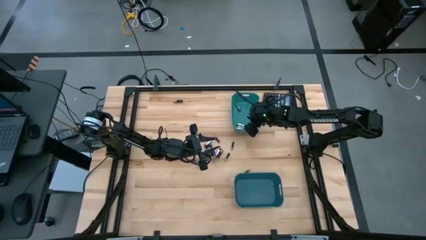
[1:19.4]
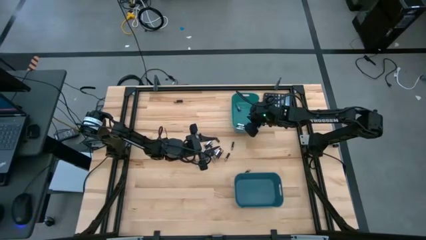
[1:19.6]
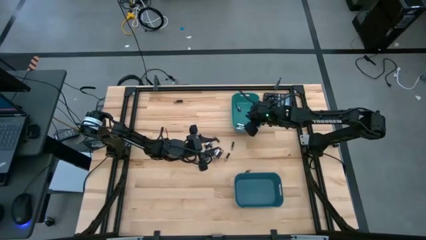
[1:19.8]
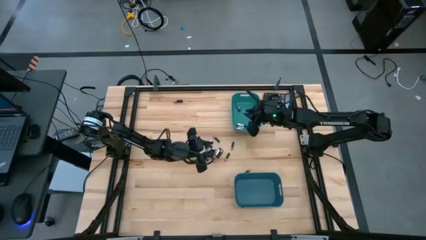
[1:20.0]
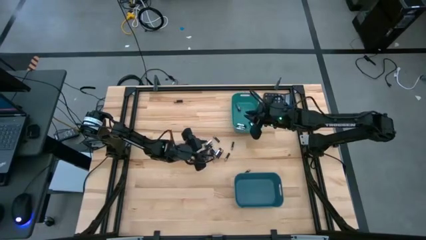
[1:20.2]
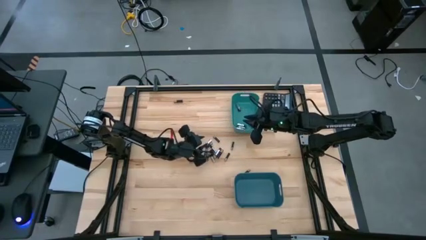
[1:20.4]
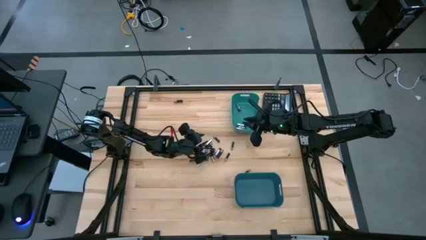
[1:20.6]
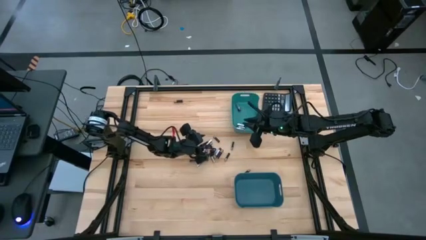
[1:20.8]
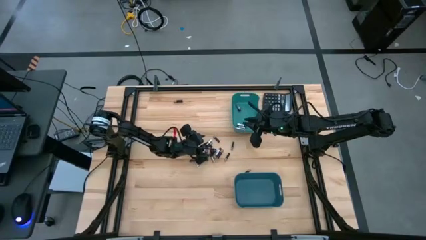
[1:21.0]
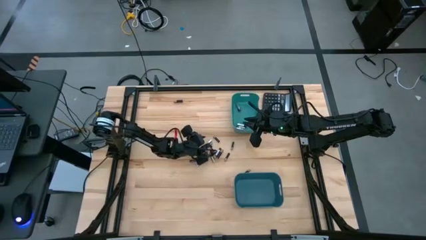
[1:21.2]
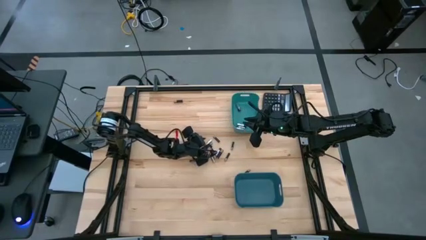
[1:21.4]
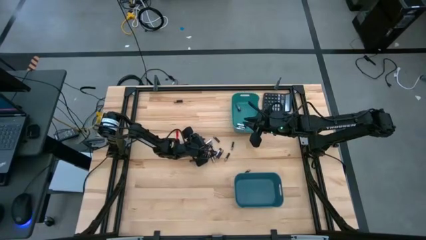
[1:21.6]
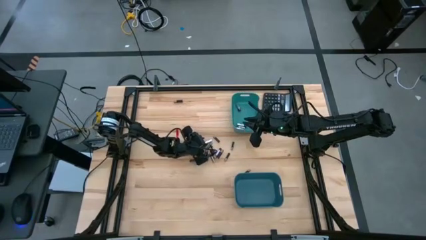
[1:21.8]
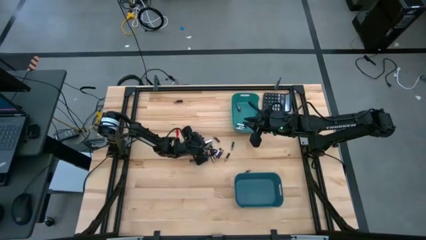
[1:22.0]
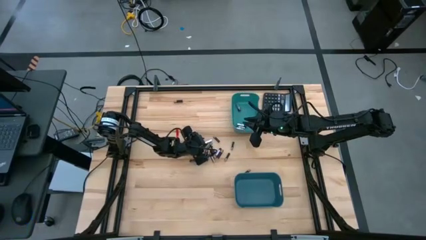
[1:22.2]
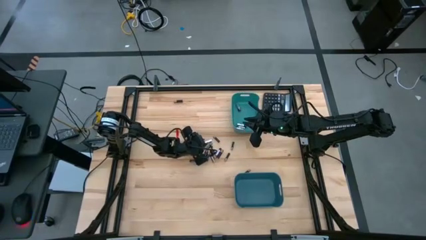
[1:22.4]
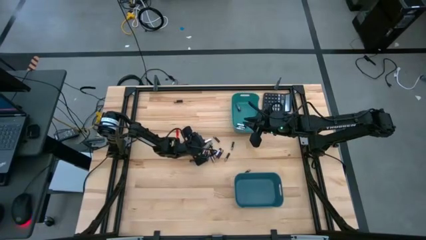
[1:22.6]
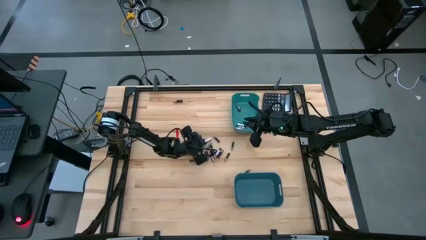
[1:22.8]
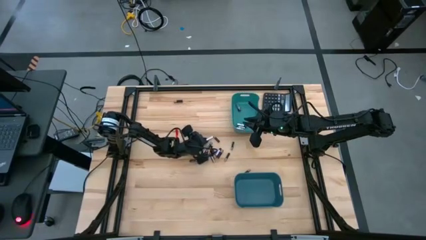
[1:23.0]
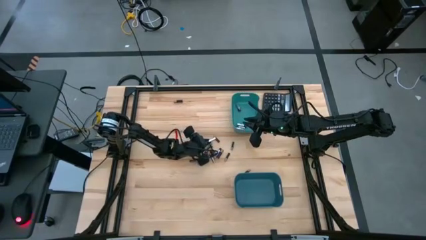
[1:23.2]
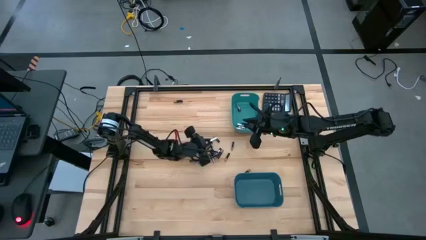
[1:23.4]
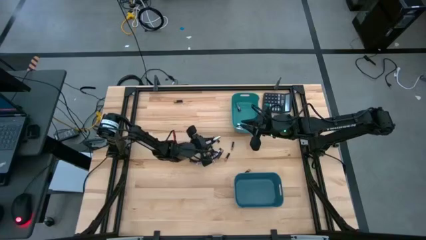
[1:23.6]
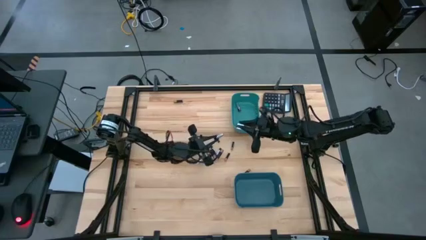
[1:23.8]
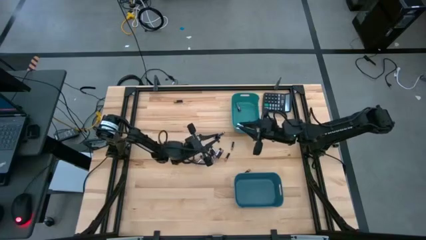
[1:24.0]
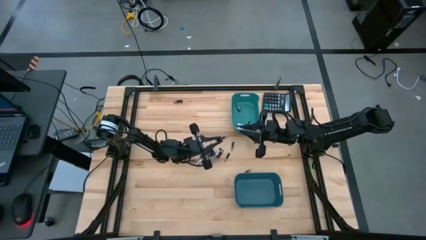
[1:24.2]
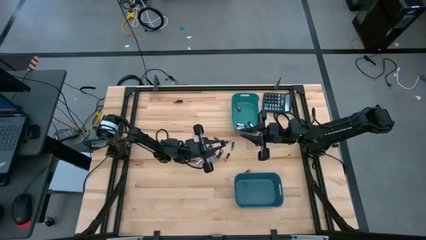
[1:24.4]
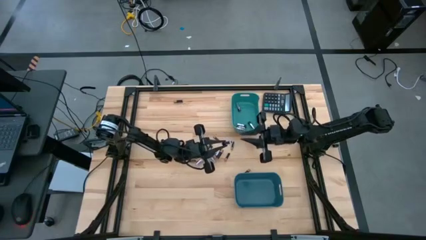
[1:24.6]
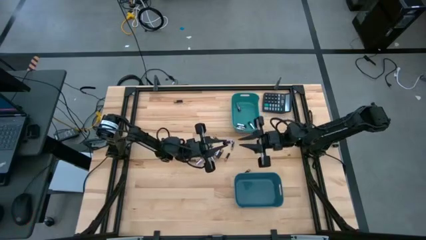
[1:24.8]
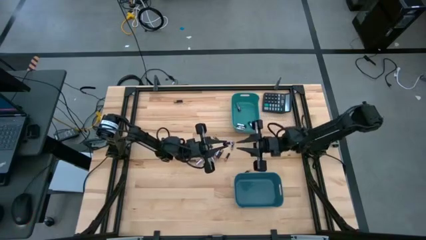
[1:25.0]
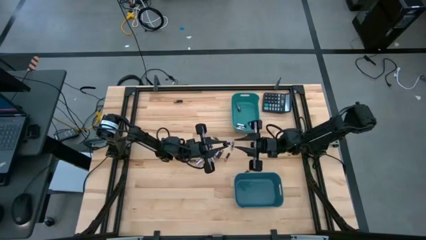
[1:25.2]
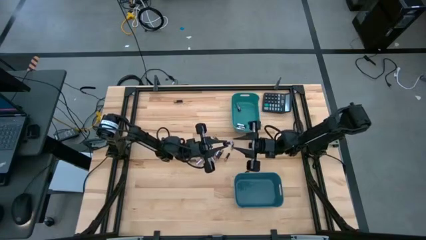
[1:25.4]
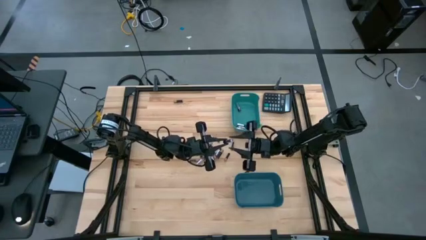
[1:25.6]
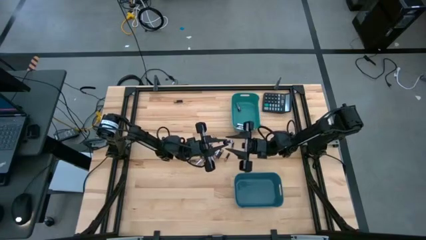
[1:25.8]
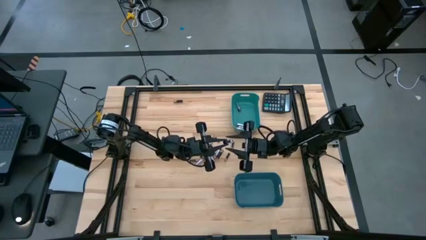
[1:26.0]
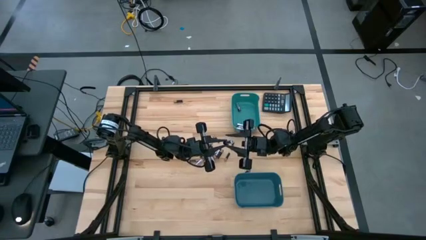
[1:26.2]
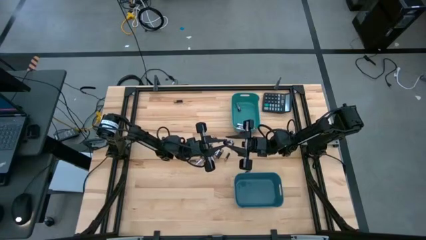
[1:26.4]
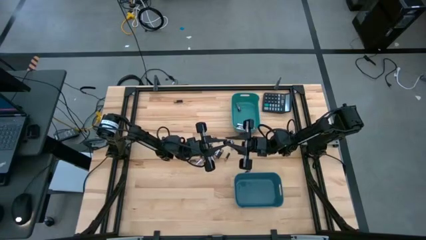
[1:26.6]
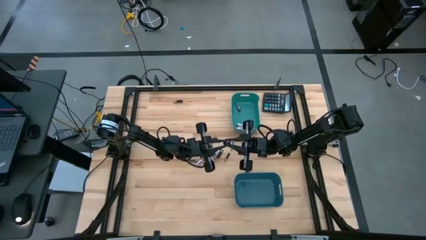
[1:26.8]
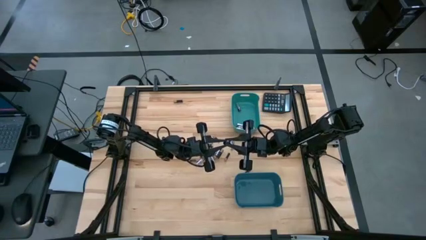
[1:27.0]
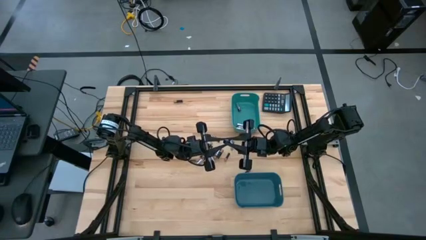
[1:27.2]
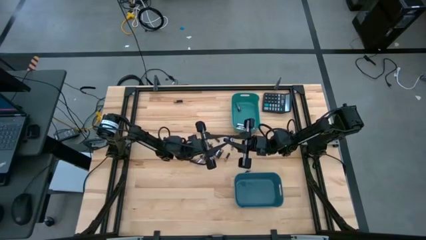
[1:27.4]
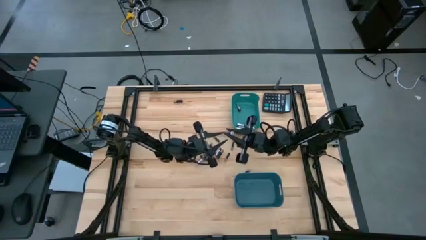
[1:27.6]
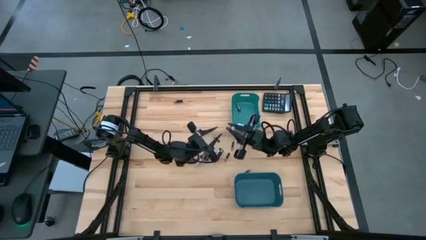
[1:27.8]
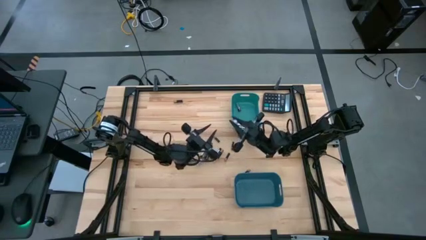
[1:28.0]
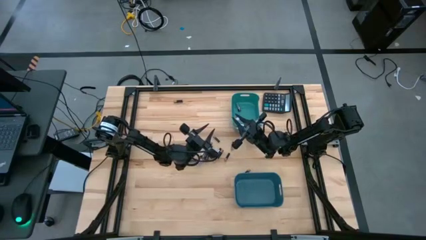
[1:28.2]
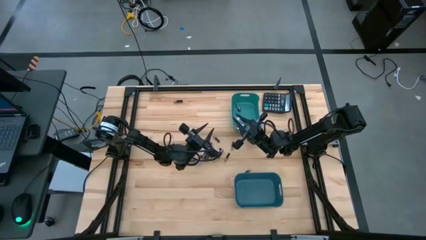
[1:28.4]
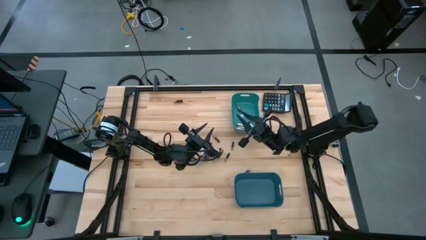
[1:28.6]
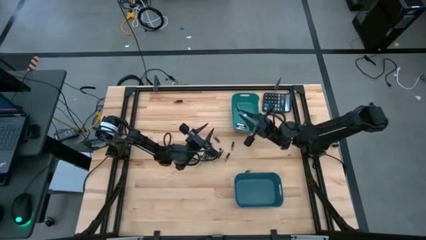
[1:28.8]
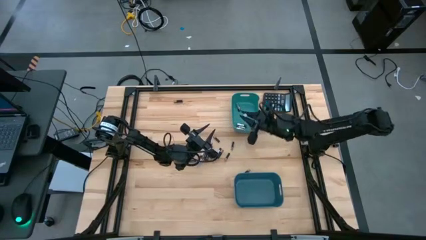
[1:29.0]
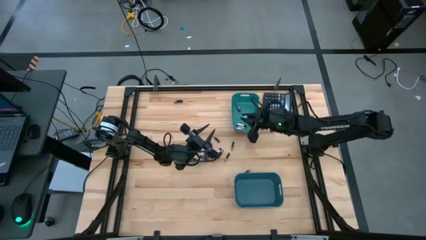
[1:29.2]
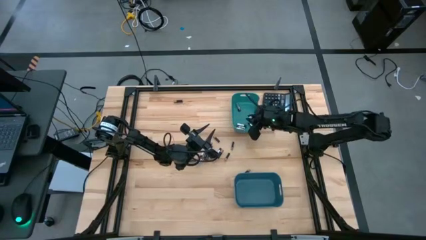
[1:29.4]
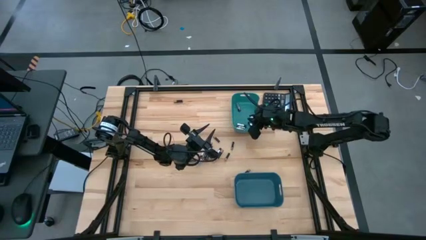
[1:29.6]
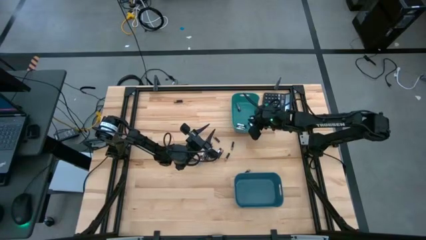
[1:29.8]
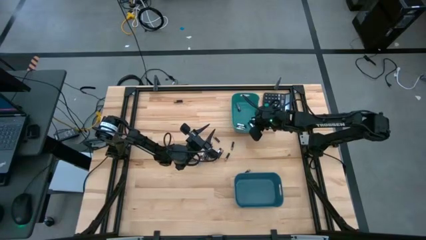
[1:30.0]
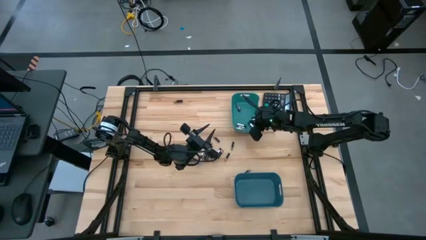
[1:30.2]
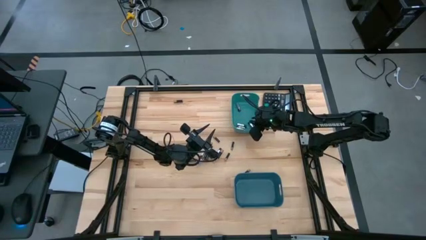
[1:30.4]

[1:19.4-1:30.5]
Task: Sort batteries
Put the silver battery into the green bin

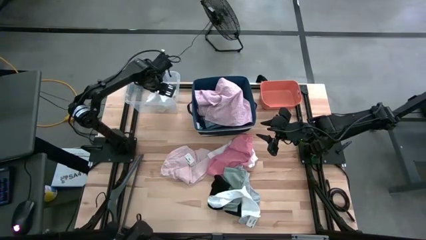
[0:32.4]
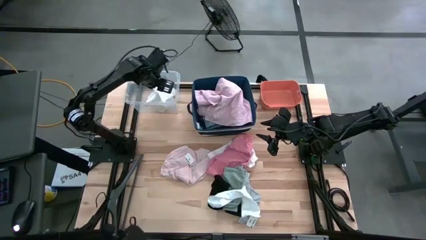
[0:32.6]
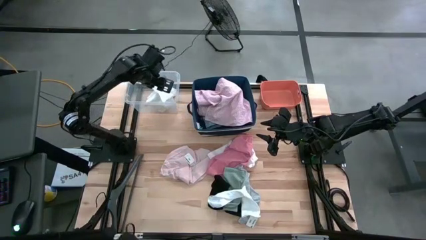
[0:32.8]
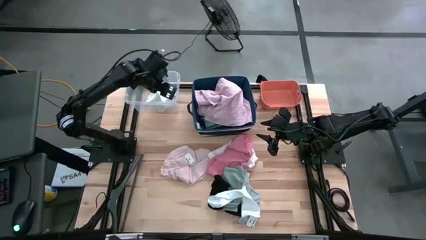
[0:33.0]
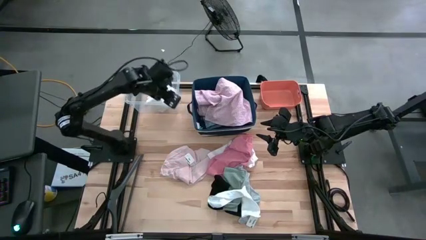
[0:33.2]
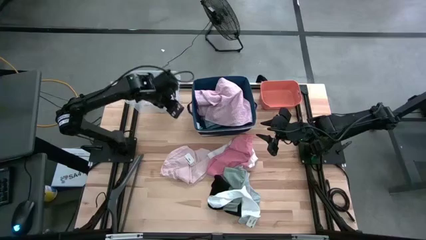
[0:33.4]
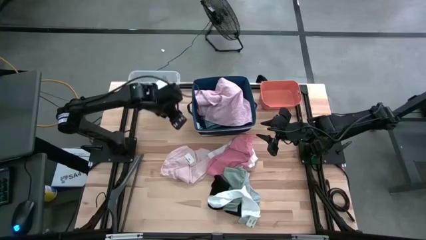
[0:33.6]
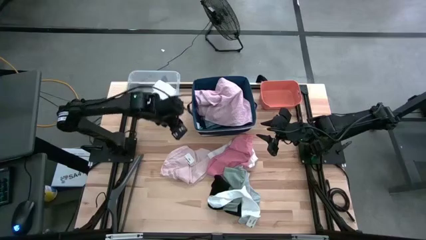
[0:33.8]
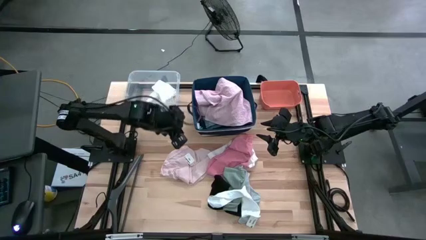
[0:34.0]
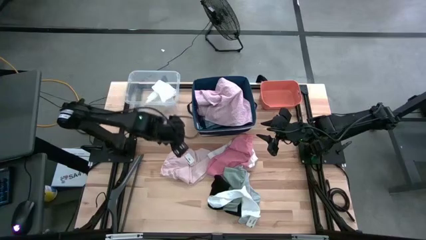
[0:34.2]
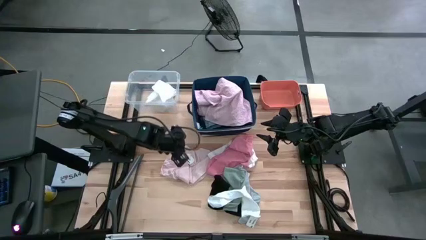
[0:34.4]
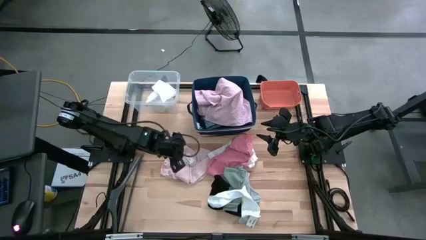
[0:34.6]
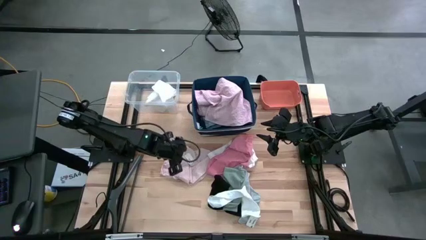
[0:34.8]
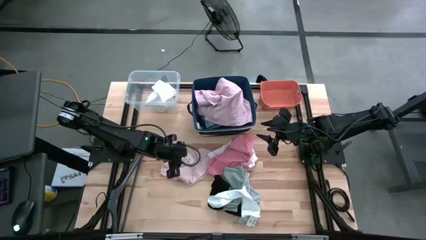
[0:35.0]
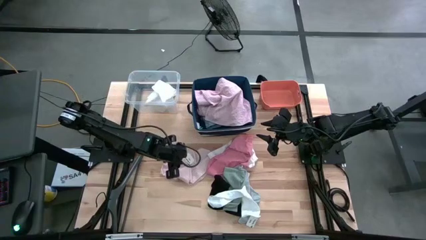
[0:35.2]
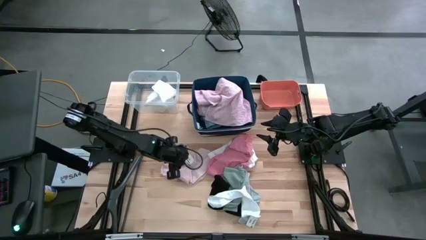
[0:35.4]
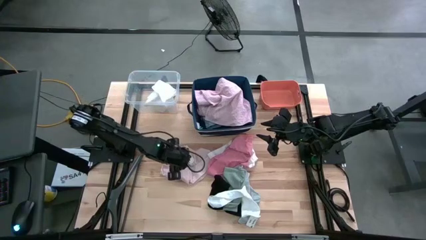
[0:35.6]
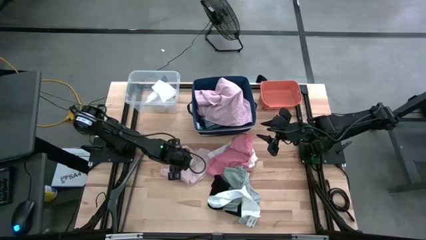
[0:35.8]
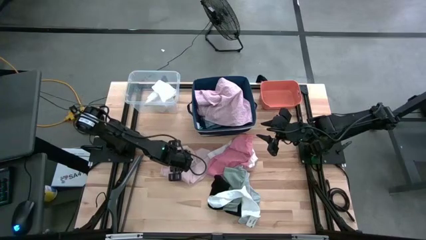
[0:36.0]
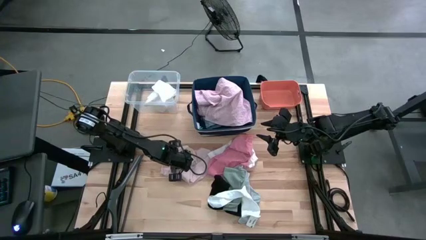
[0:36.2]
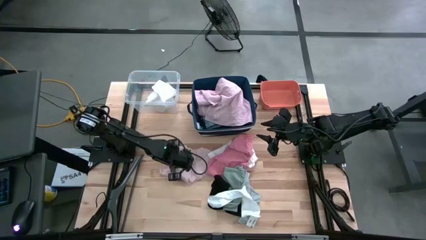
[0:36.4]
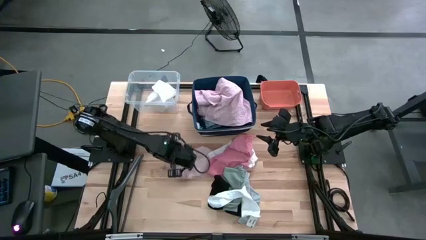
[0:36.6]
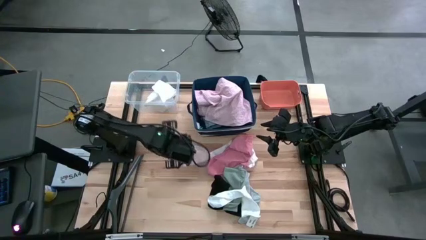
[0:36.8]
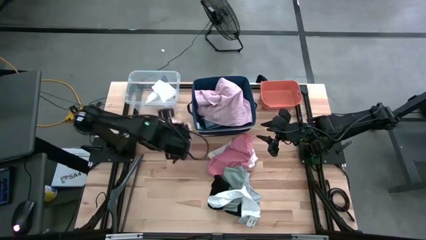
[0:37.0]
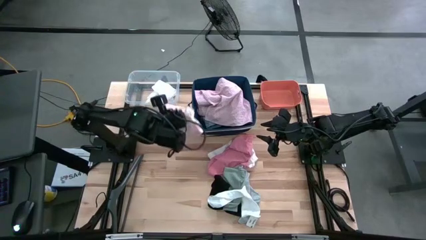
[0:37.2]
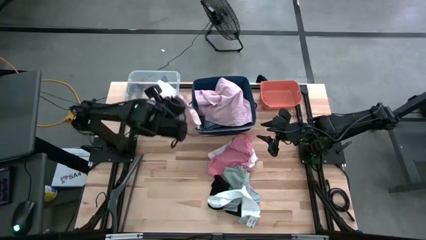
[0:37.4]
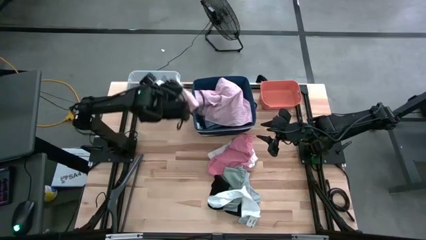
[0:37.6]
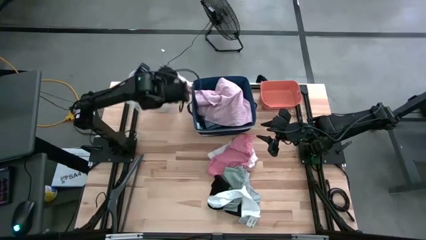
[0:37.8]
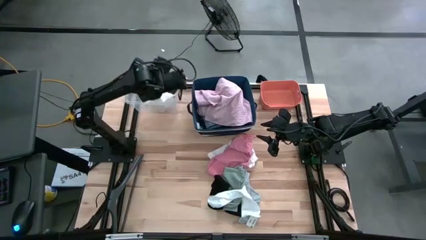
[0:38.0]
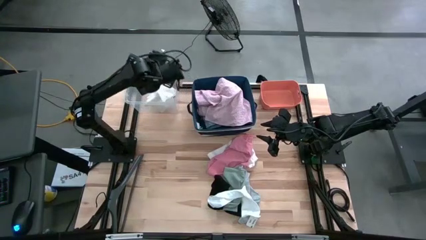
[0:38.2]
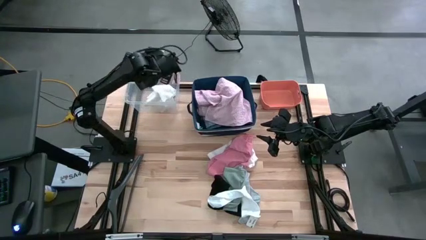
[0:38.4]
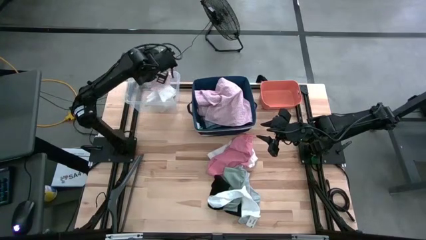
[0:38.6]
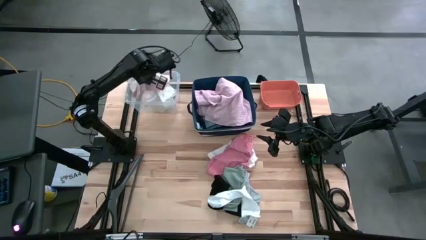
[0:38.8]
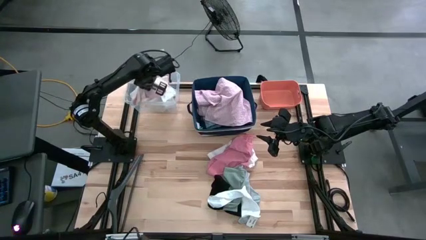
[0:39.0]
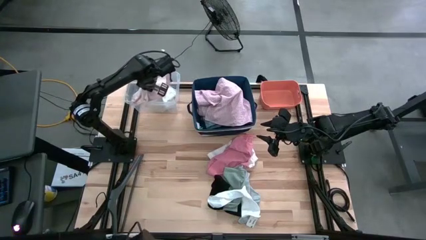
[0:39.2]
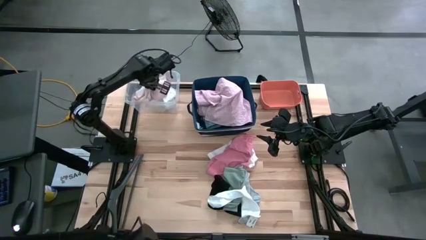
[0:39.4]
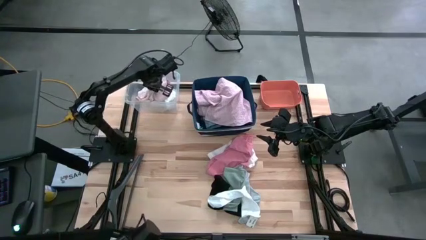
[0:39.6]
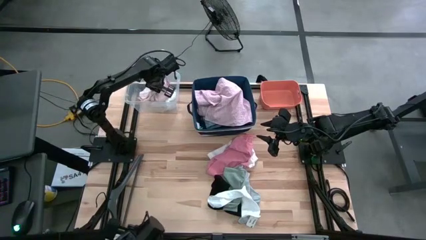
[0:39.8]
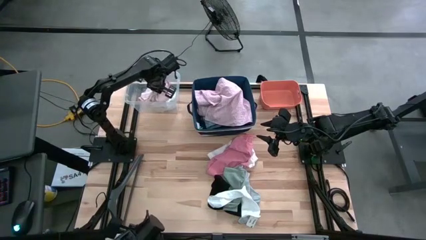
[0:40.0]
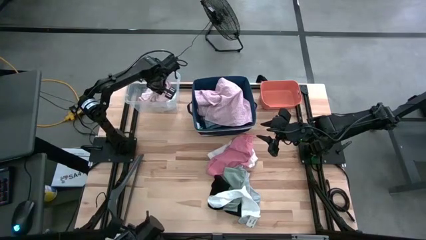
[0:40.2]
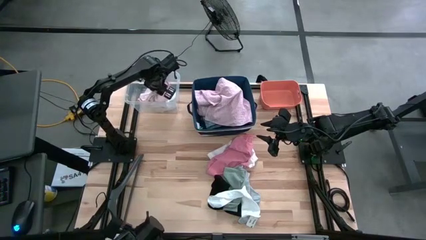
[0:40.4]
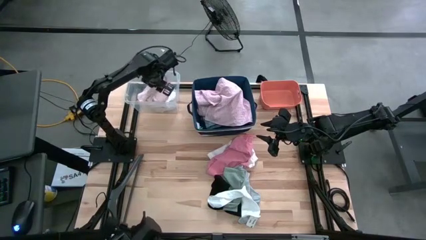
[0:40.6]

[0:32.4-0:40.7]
Task: Pick & Place Cloths
Put the light pink underwear into the transparent bin
